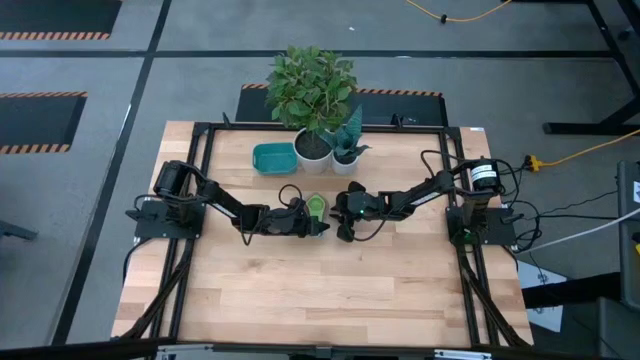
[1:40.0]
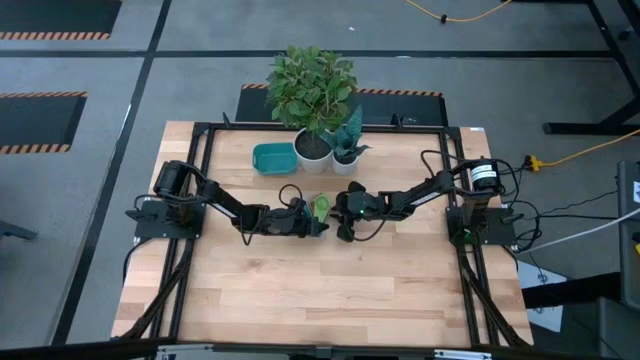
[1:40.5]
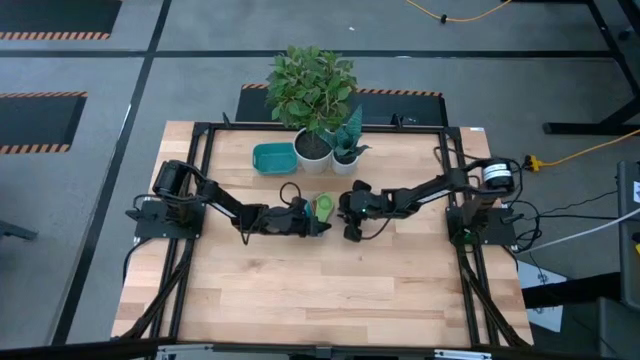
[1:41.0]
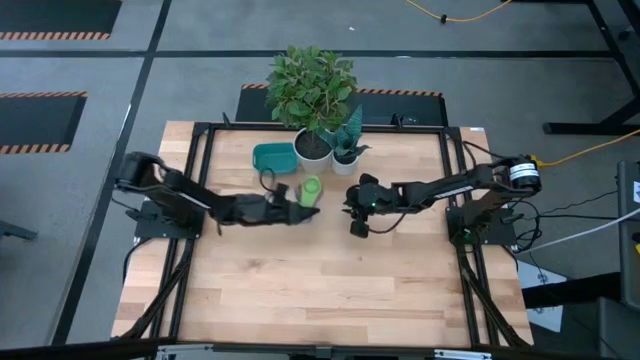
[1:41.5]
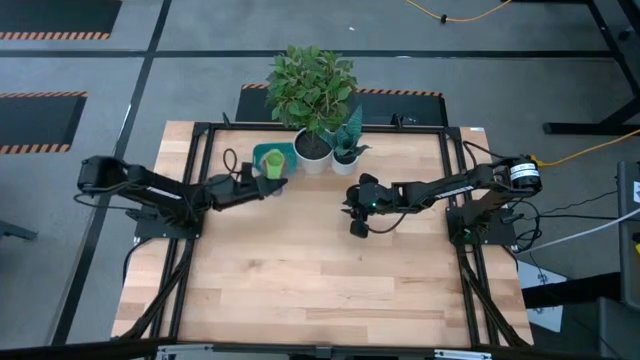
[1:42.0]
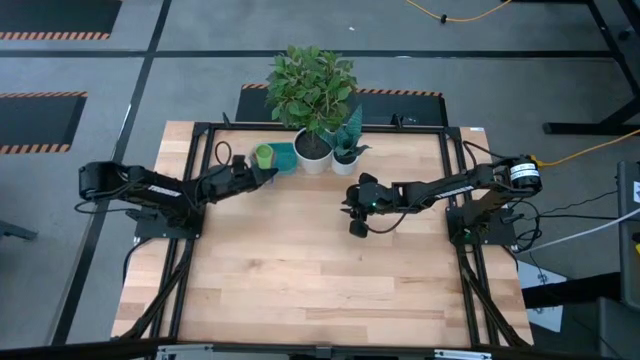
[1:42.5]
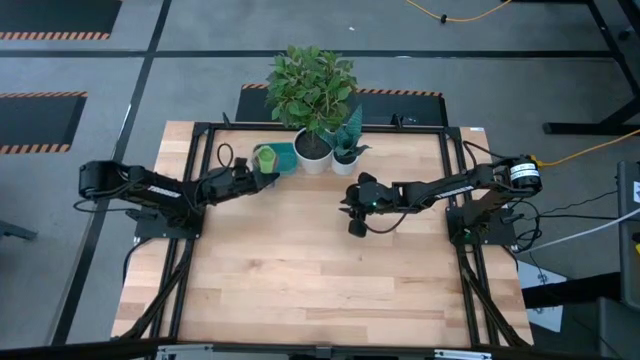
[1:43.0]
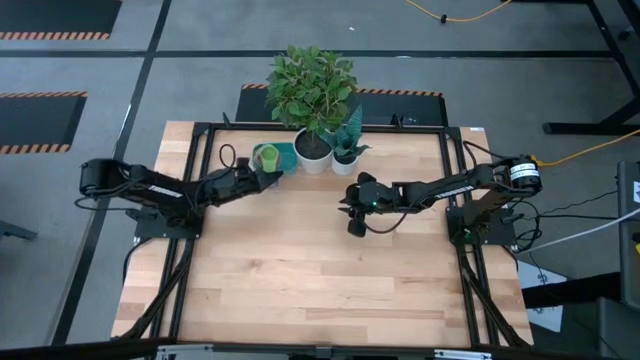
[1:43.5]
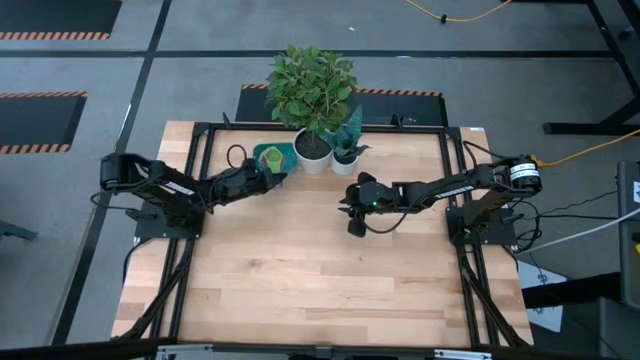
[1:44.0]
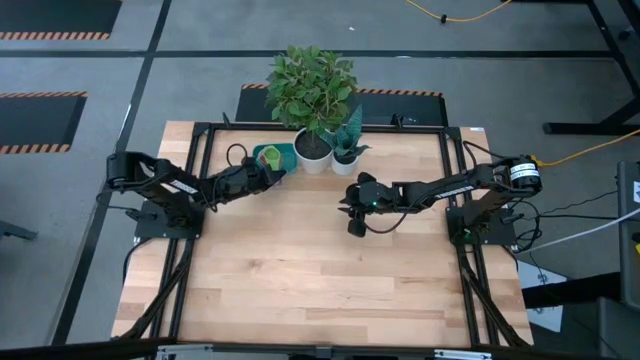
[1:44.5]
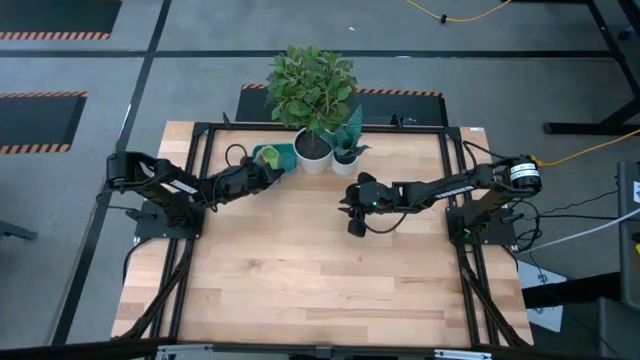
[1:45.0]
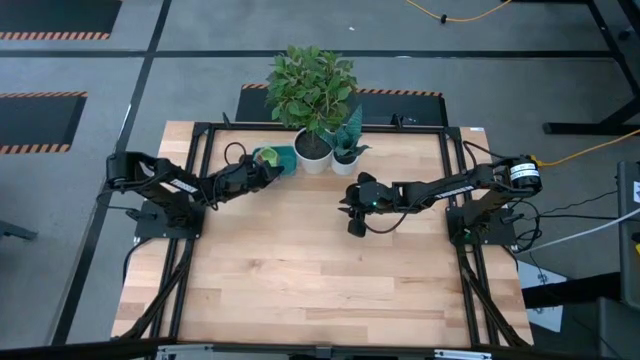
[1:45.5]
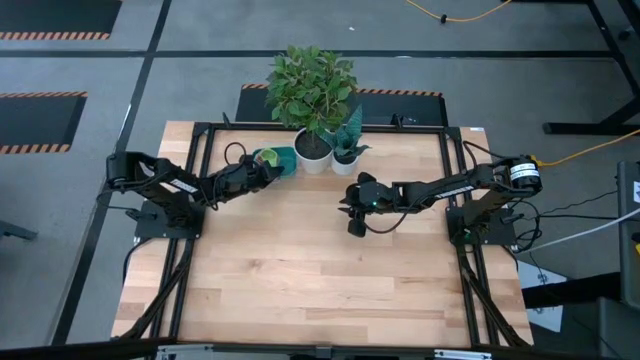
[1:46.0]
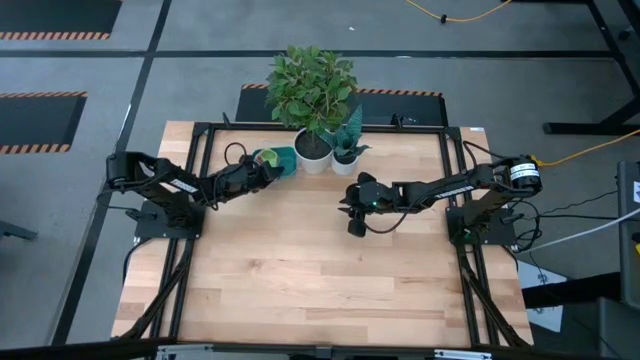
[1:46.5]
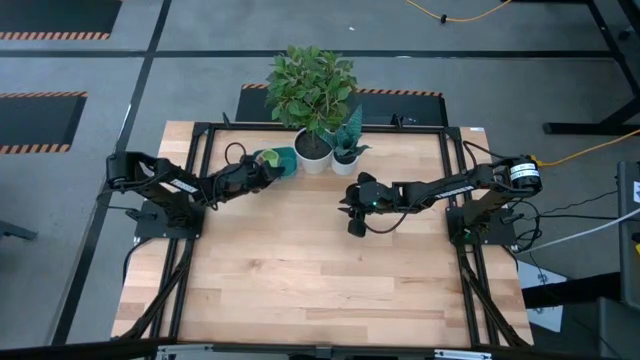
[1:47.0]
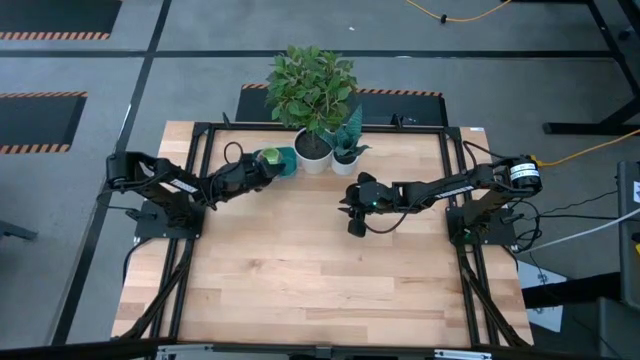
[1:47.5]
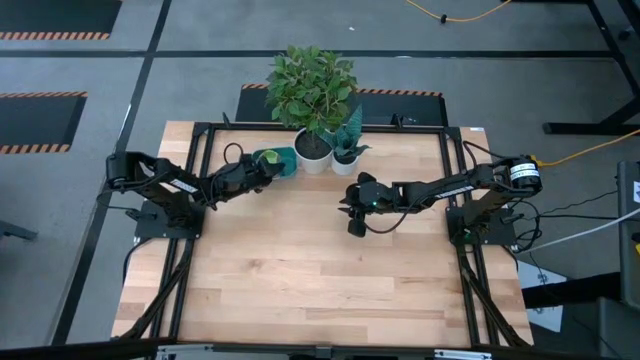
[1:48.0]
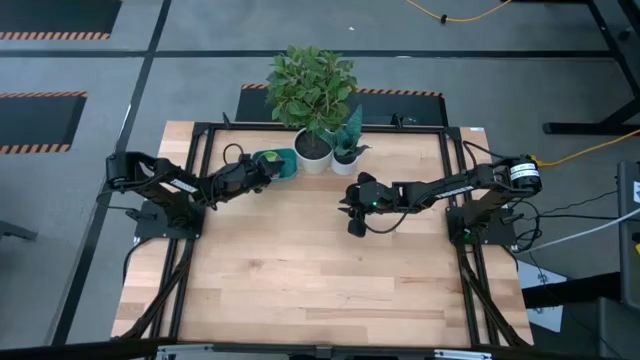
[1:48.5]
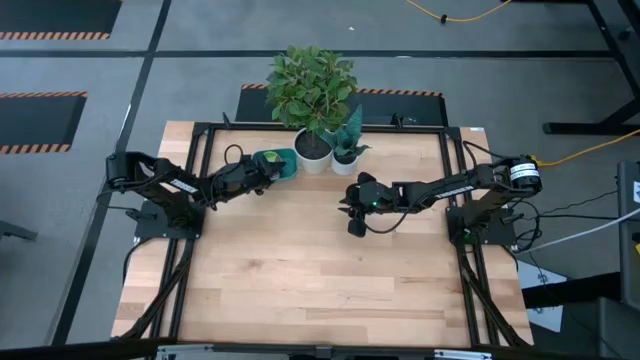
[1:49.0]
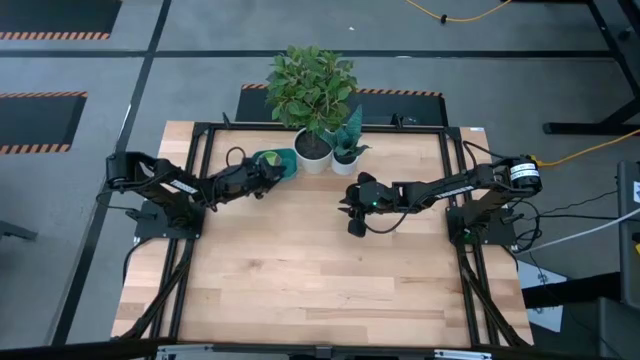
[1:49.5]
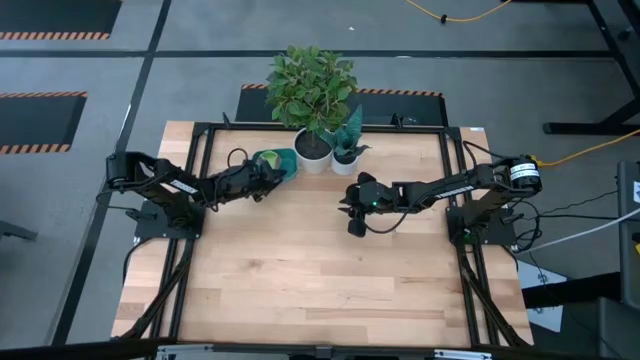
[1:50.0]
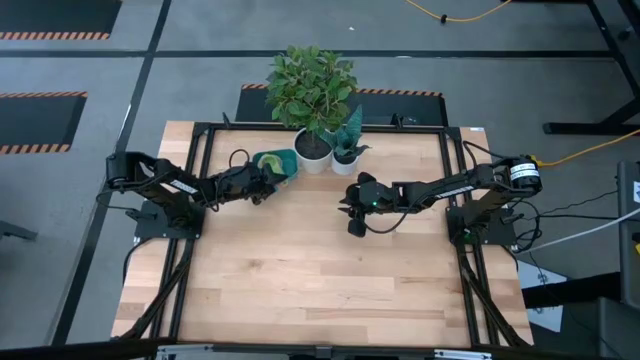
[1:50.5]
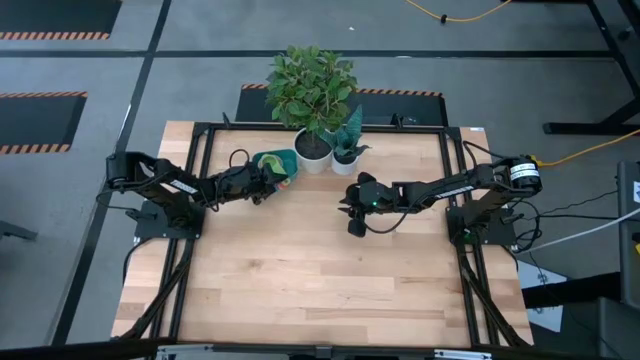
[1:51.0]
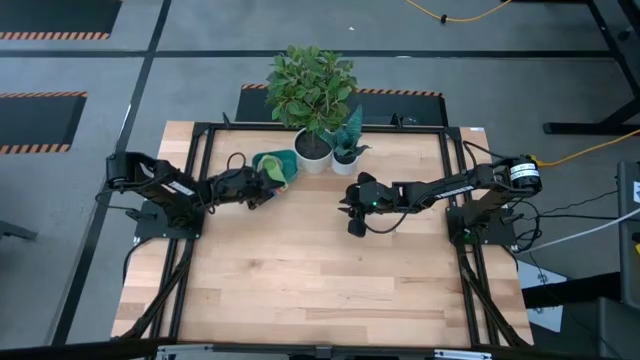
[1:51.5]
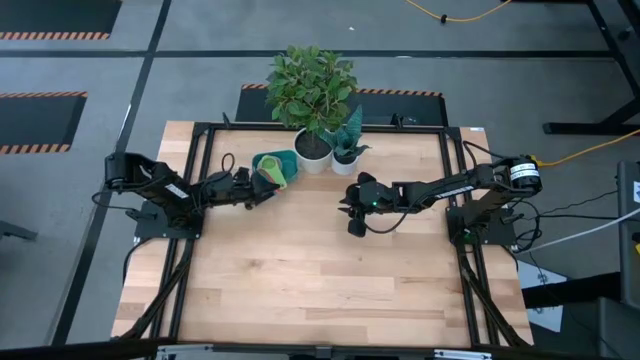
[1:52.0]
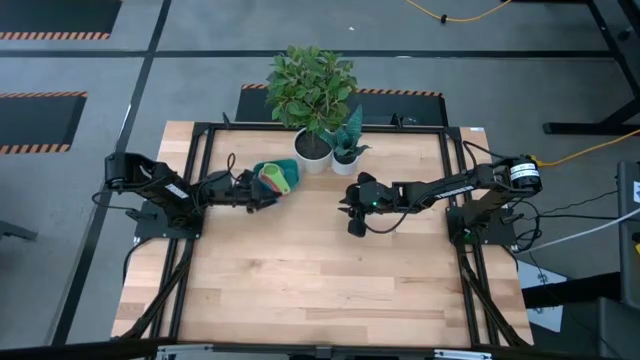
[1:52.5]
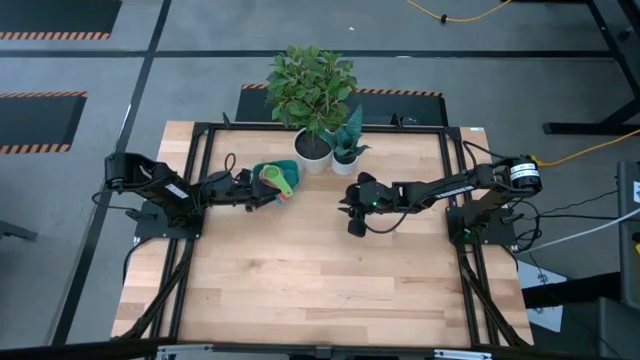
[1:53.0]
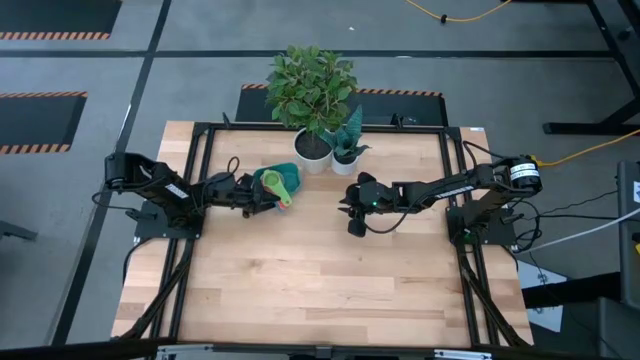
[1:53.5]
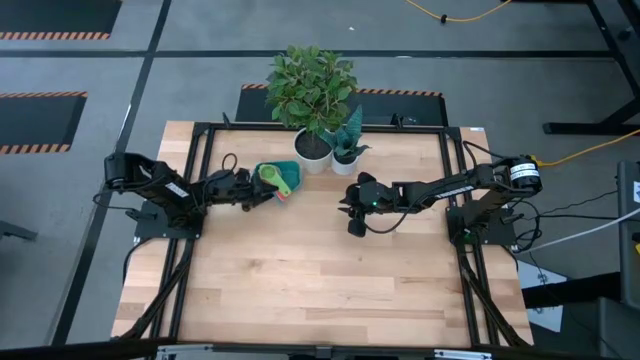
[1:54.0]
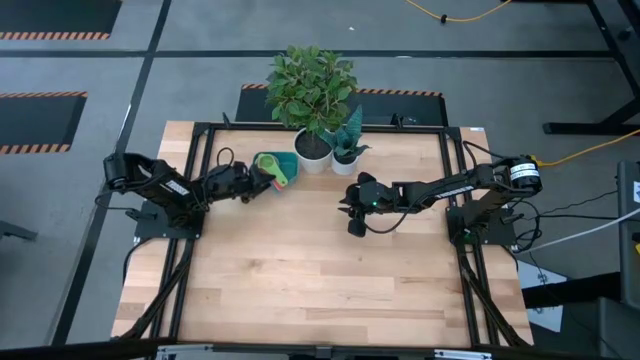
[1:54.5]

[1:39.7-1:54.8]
Task: Nest measuring cups in basket
Put the stacked measuring cup into the blue bin

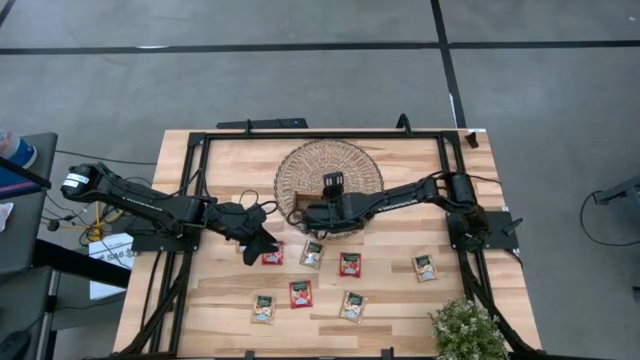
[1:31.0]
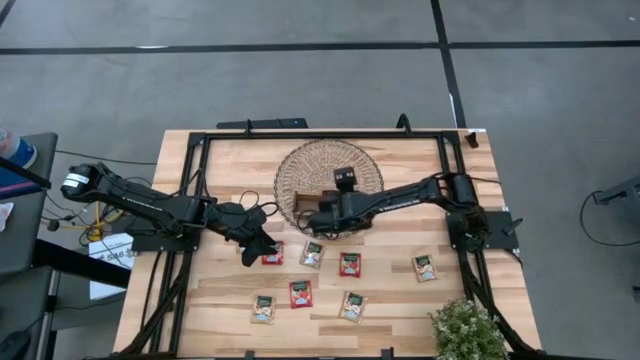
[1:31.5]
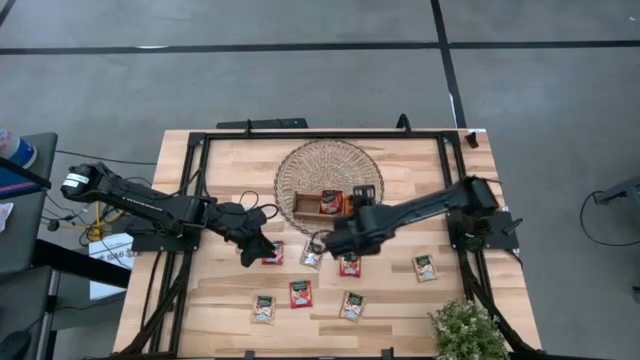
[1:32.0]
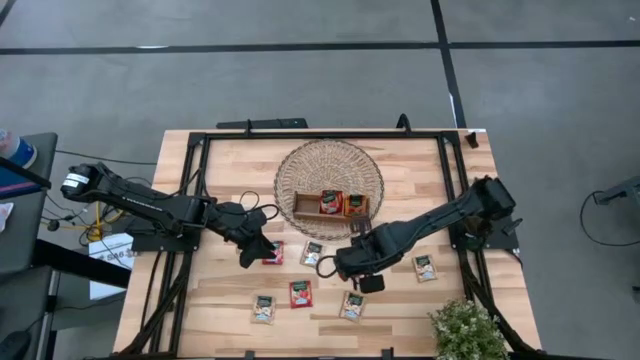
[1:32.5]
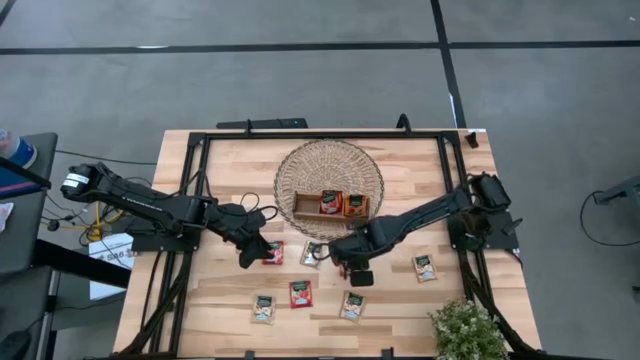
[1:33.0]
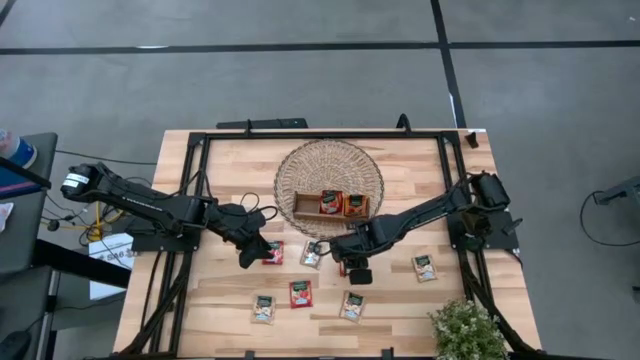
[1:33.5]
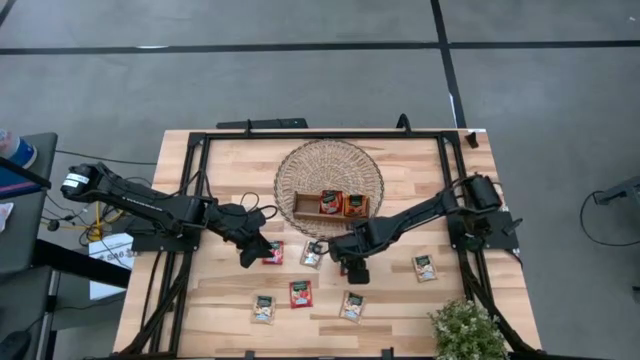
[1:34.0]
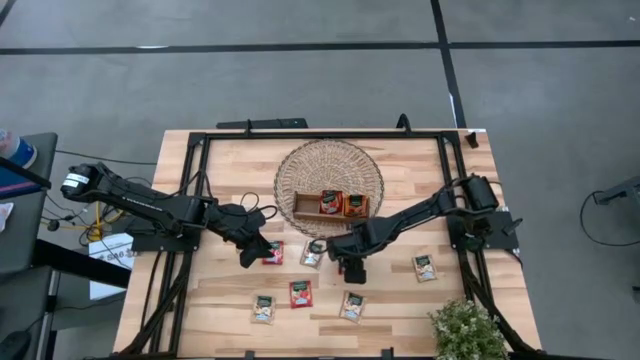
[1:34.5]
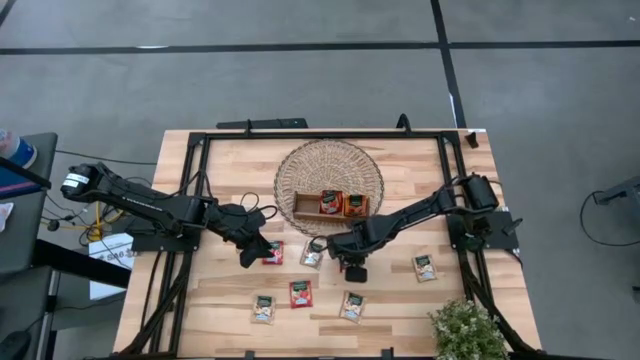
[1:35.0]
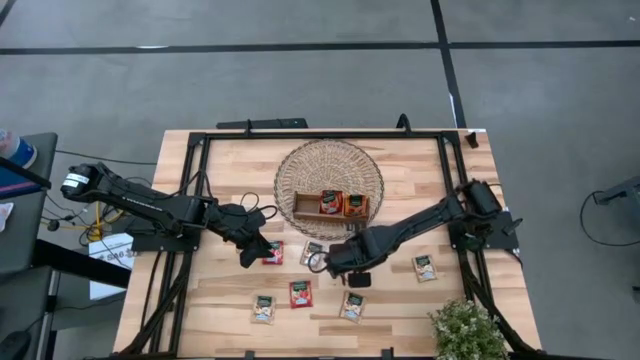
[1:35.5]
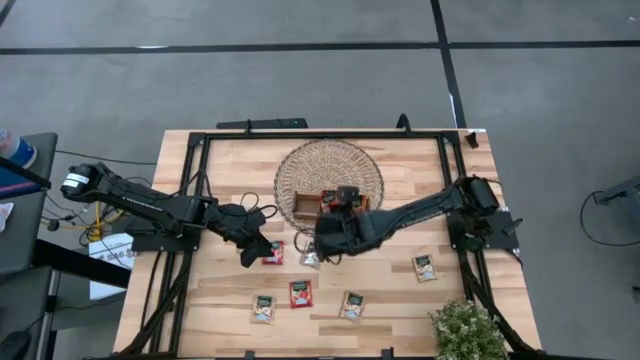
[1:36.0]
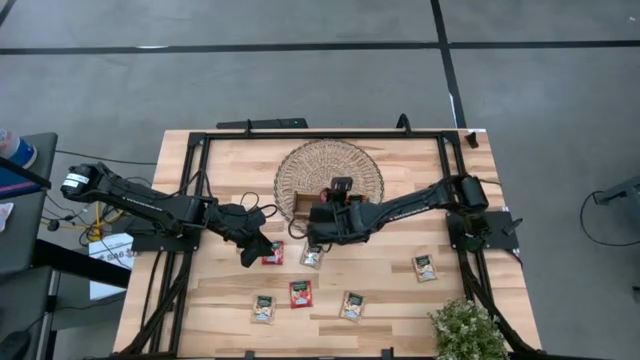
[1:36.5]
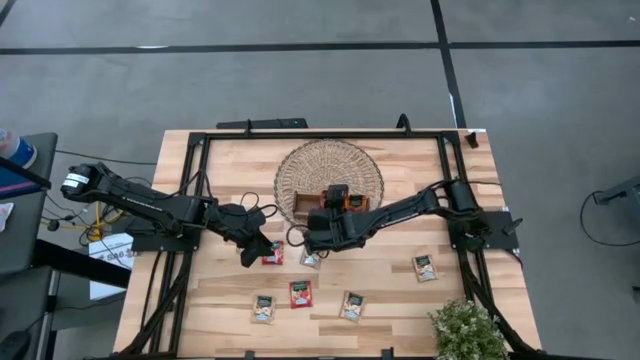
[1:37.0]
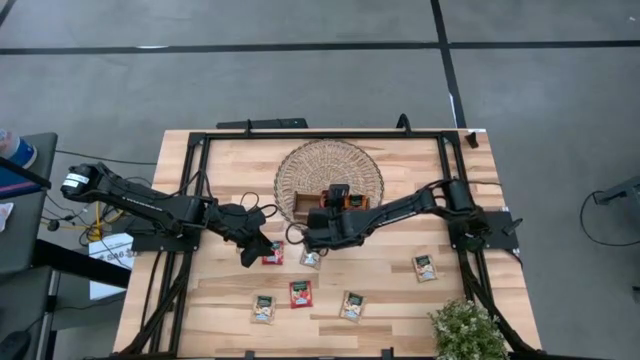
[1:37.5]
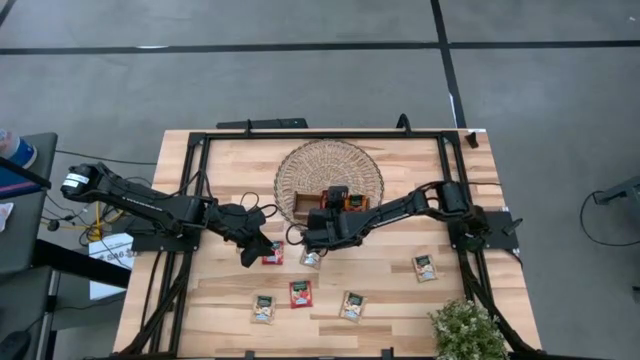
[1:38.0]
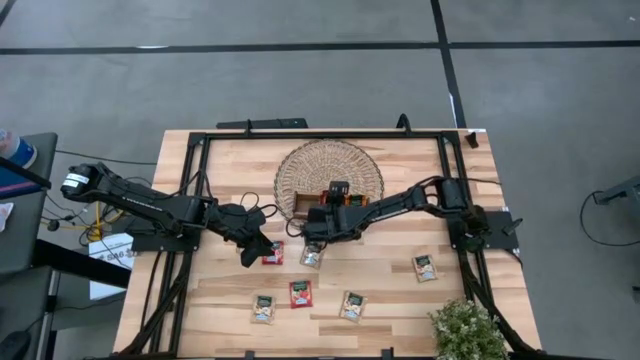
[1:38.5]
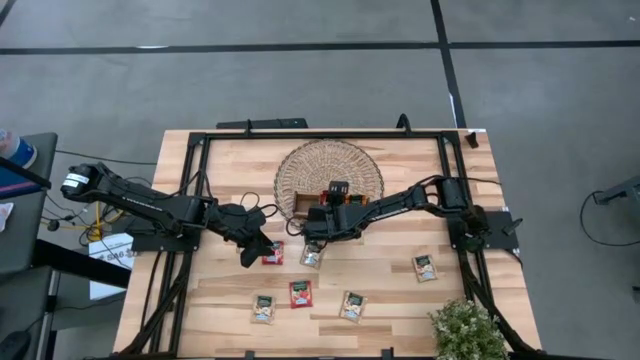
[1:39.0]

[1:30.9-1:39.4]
Task: Pick & Place Tea
Put the red tea bag into the middle section of the wooden organizer
